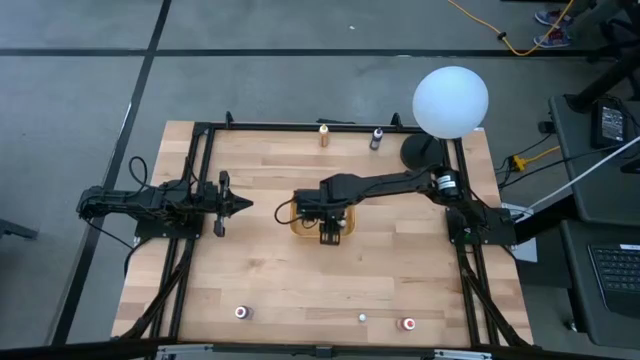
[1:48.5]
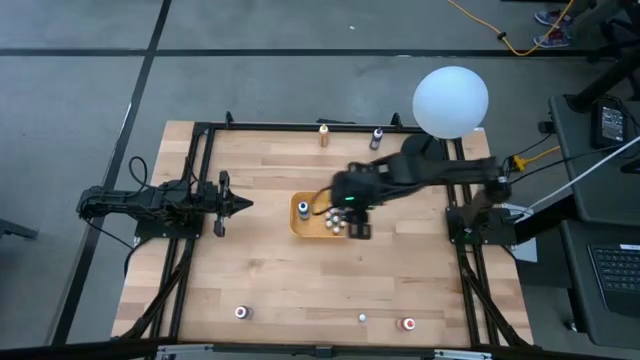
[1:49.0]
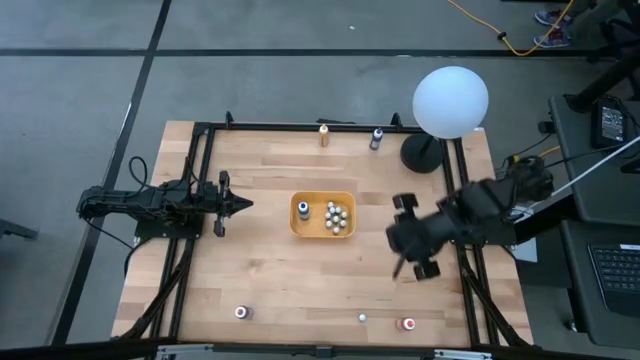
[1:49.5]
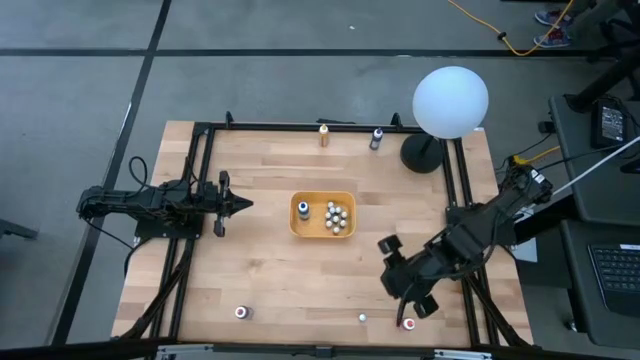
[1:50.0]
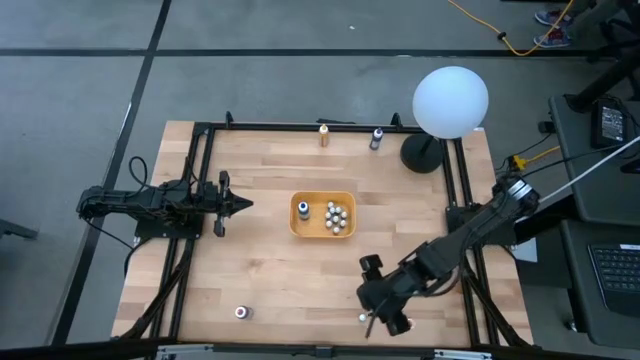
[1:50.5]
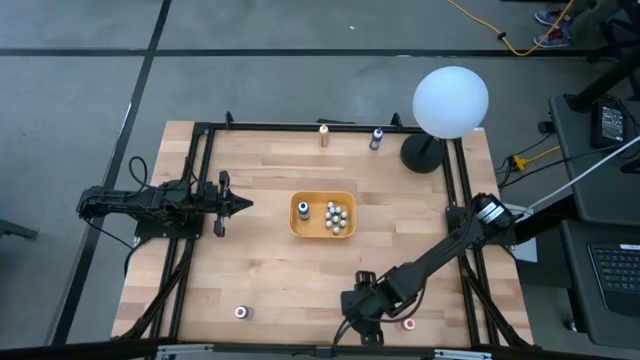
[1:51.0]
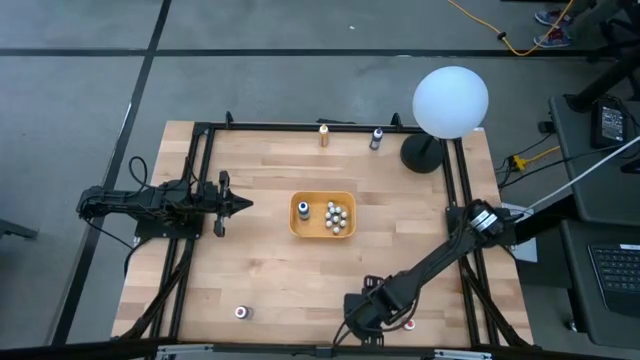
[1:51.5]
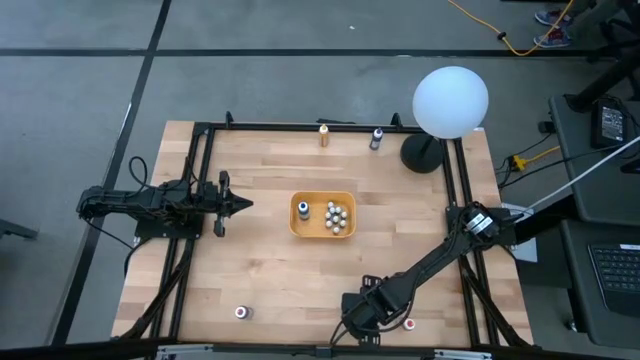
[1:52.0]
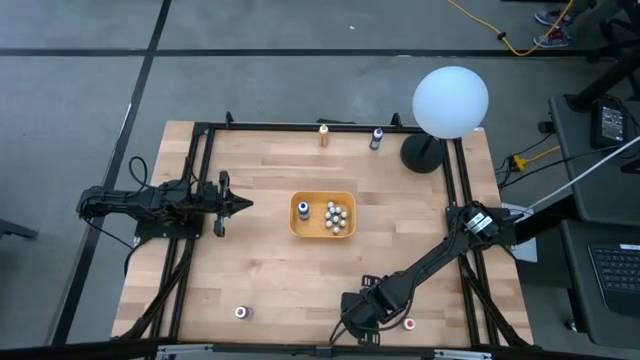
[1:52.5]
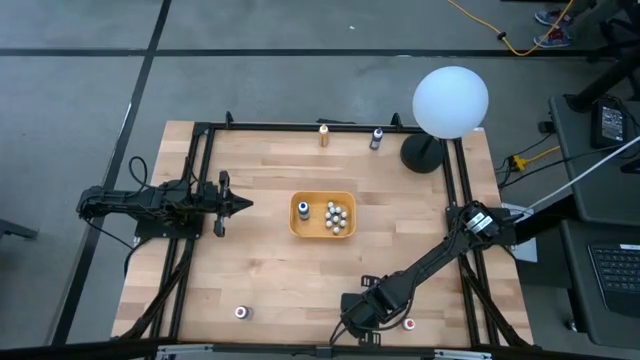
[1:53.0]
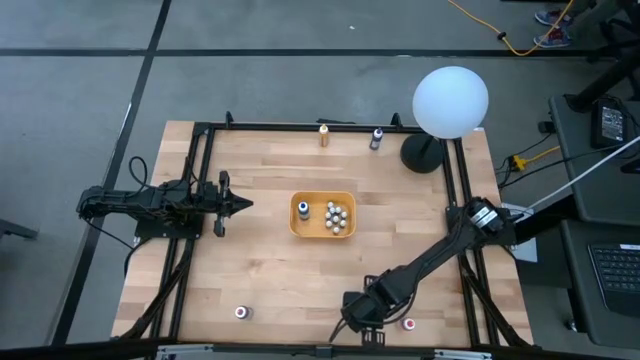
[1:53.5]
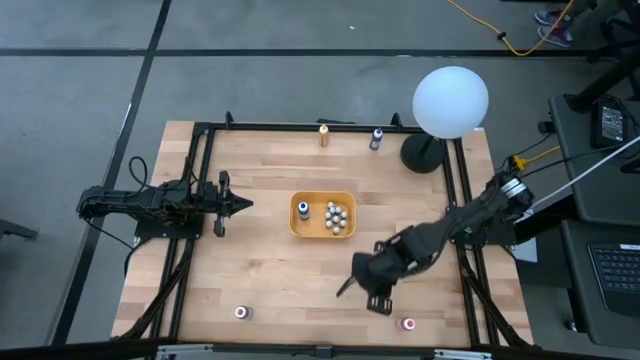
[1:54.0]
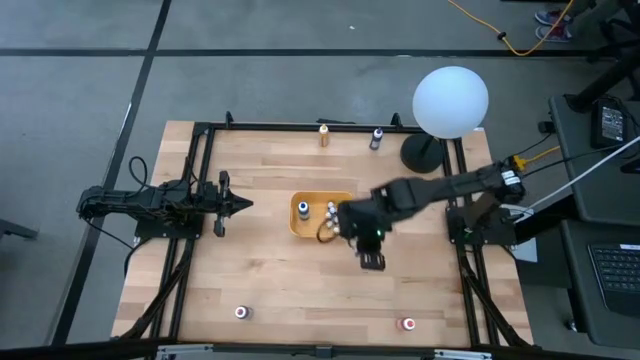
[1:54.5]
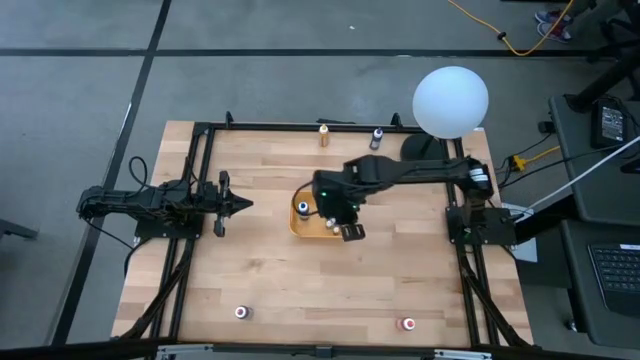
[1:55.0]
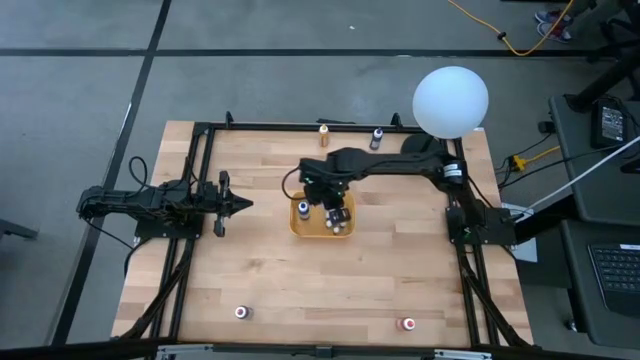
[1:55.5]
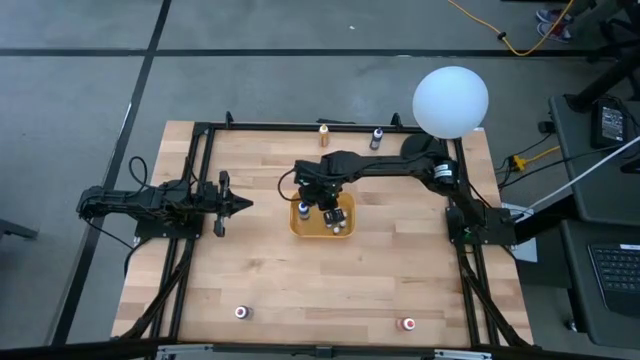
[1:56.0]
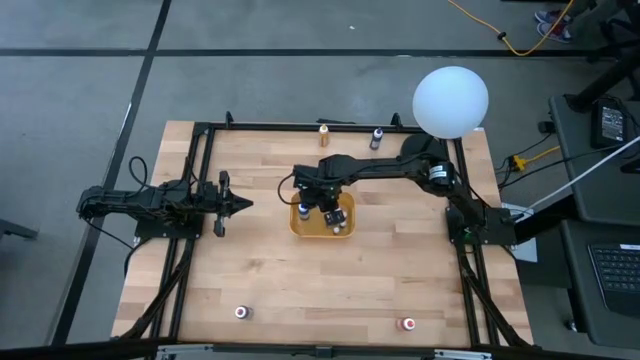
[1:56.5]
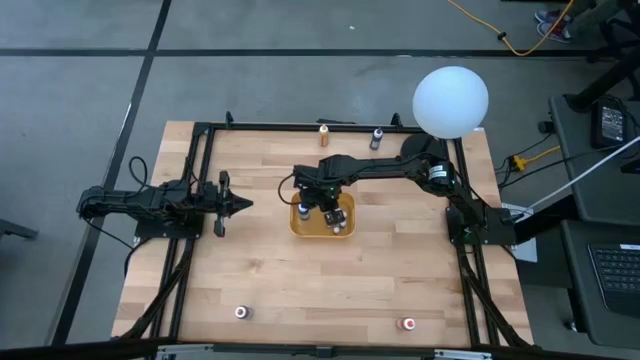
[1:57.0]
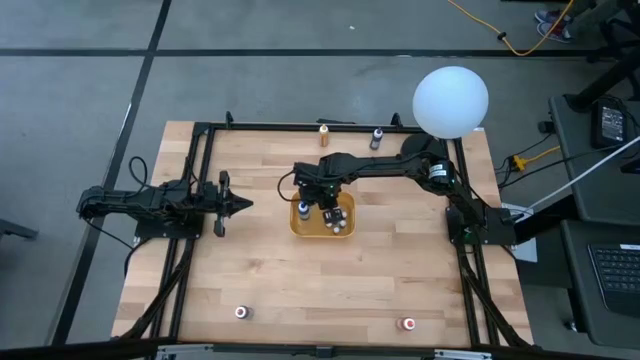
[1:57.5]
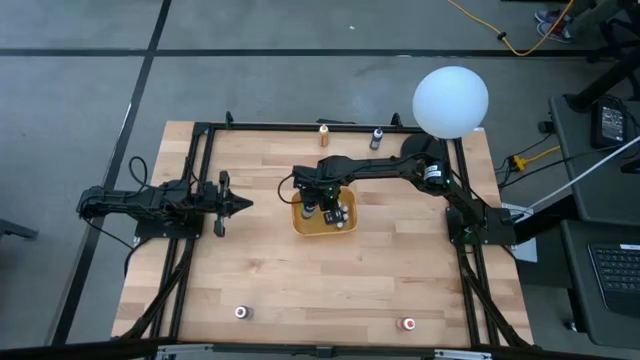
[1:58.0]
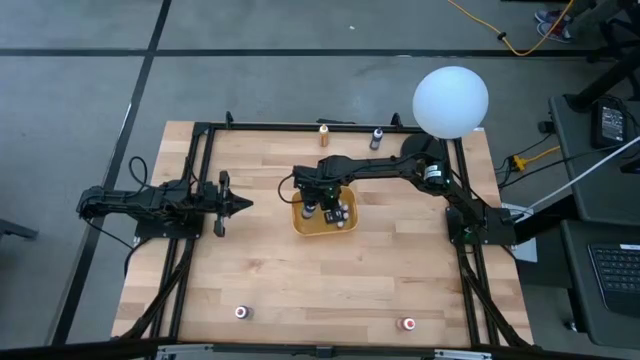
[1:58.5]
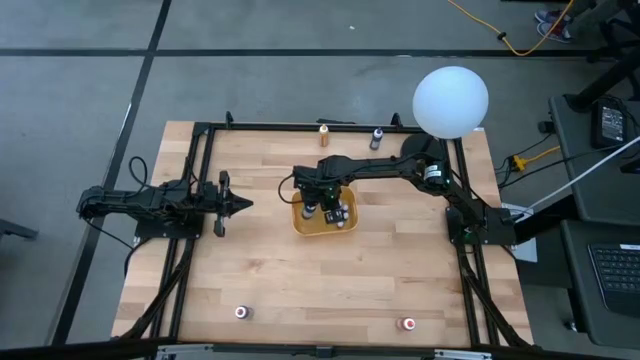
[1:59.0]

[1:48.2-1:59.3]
Task: Pick & Place food coloring
Put the green food coloring bottle into the yellow bin

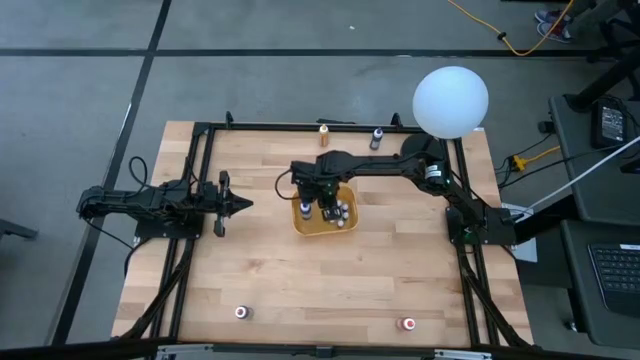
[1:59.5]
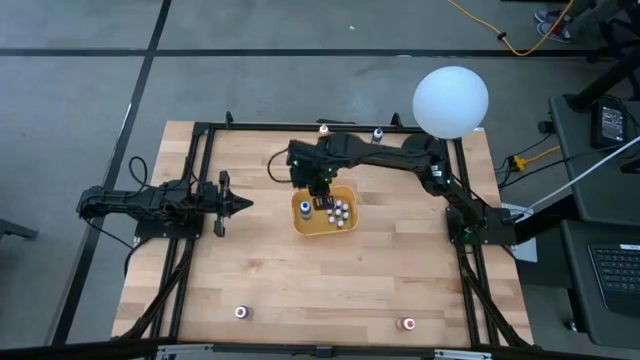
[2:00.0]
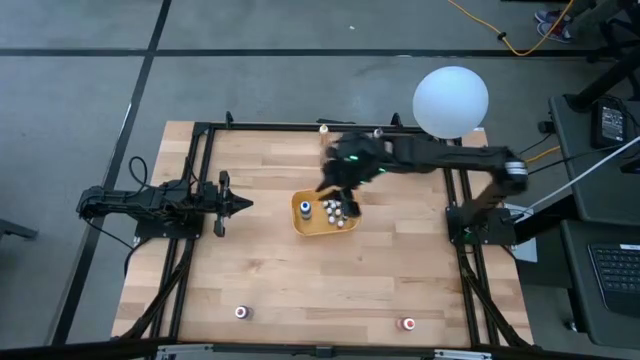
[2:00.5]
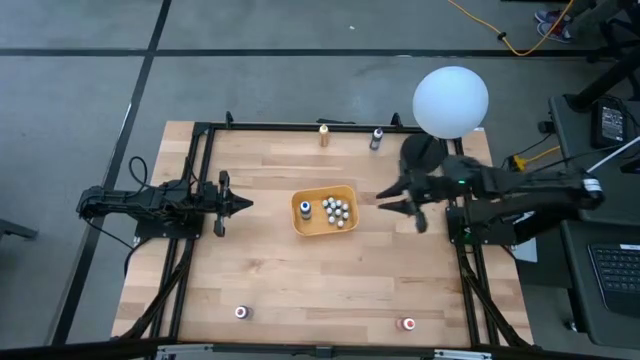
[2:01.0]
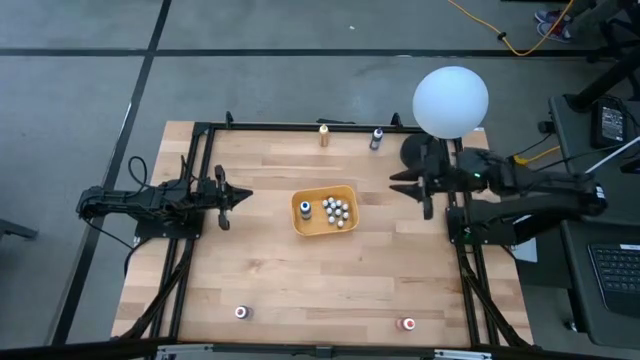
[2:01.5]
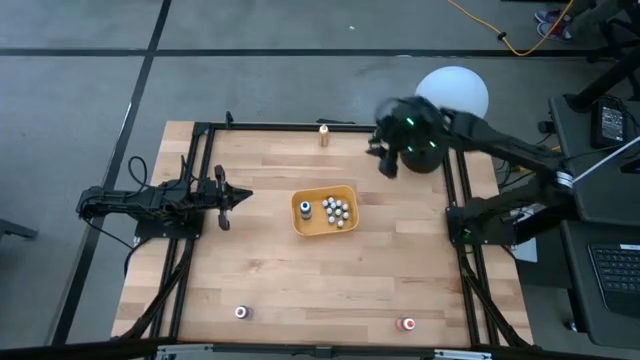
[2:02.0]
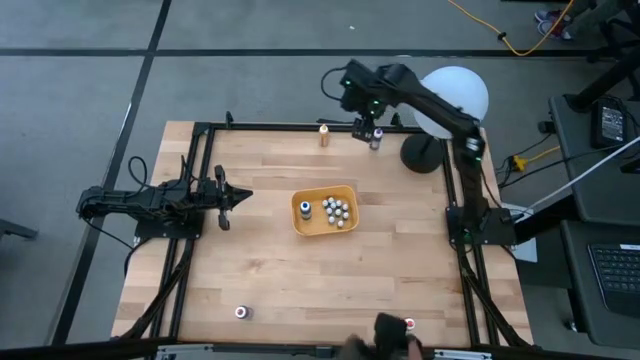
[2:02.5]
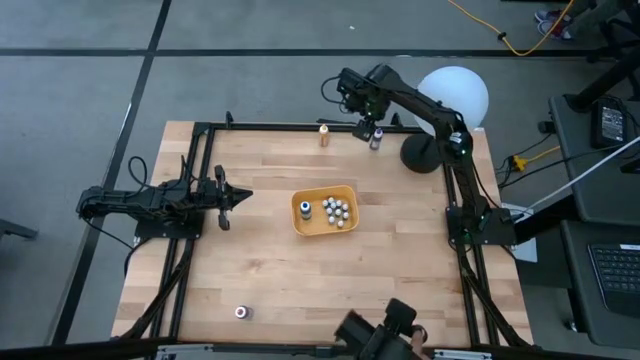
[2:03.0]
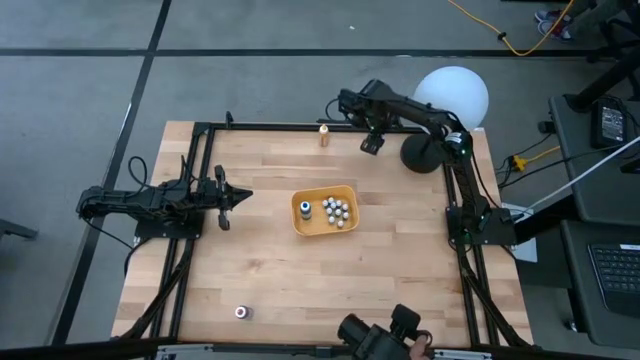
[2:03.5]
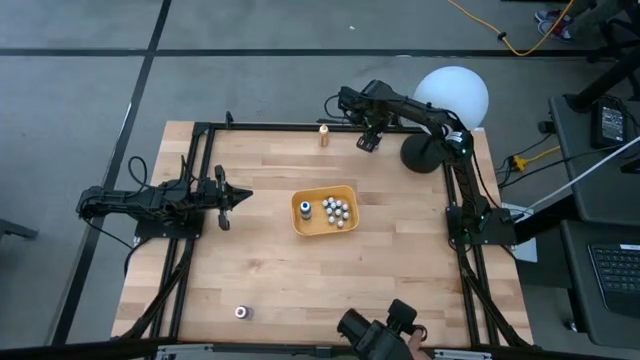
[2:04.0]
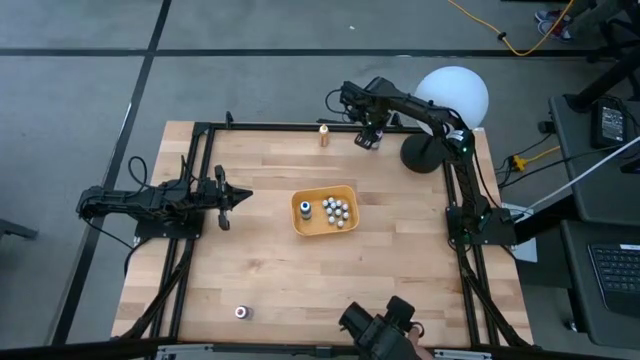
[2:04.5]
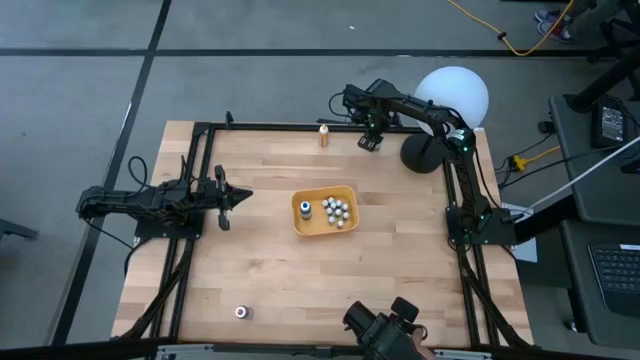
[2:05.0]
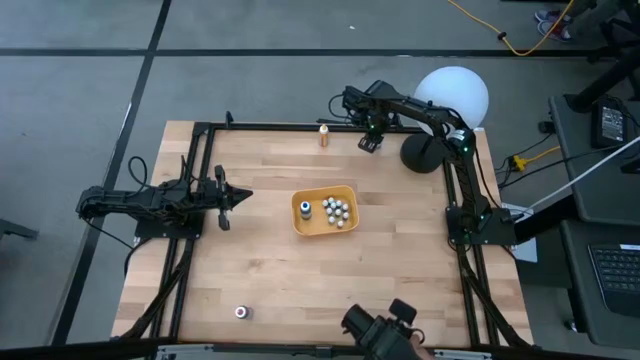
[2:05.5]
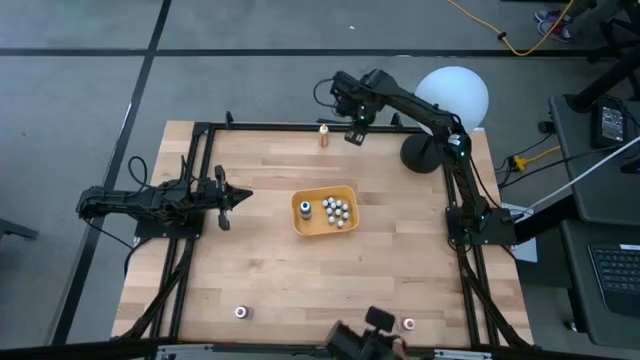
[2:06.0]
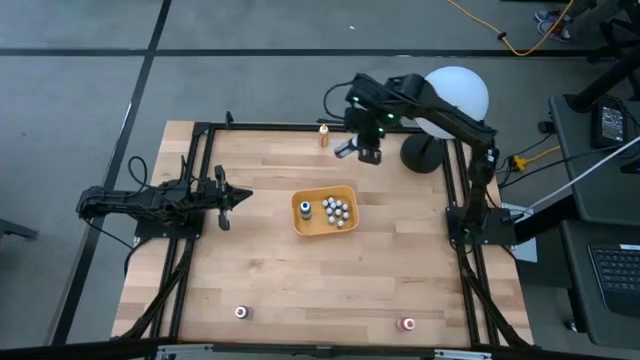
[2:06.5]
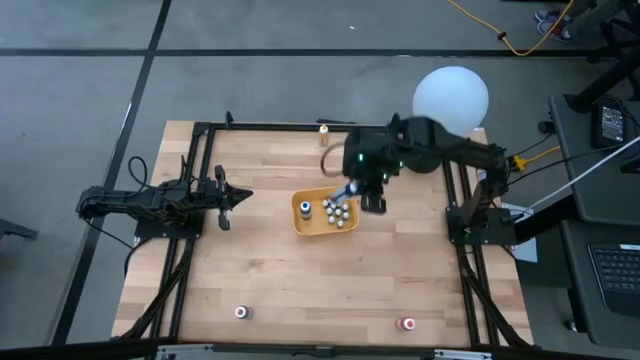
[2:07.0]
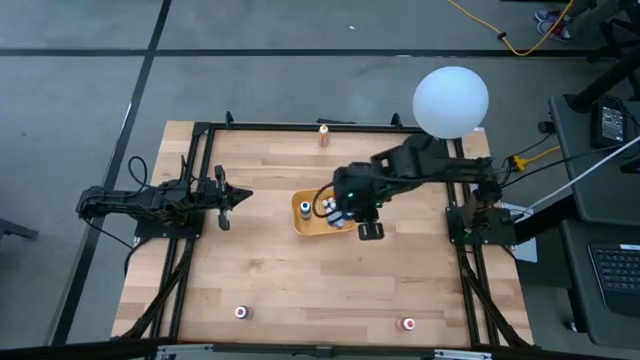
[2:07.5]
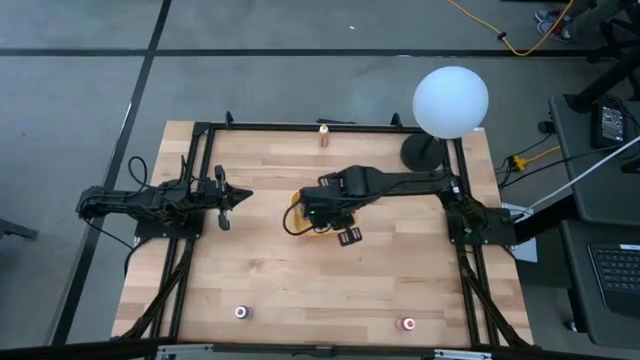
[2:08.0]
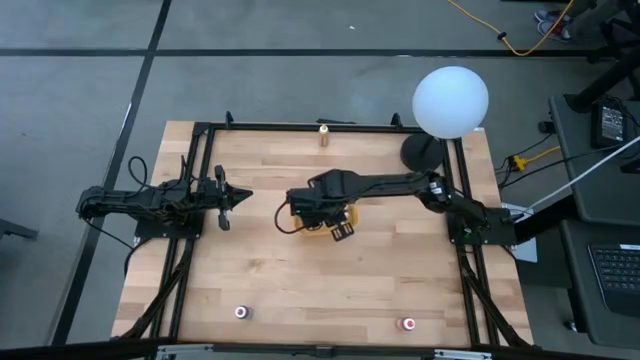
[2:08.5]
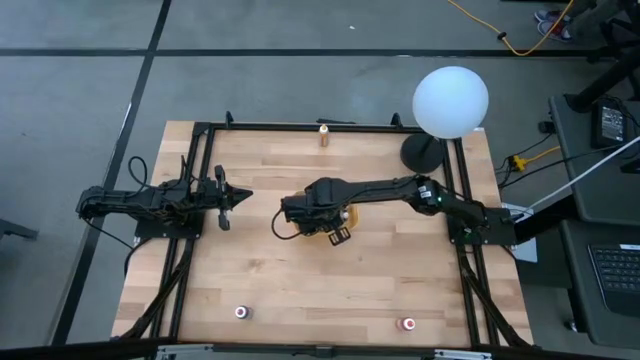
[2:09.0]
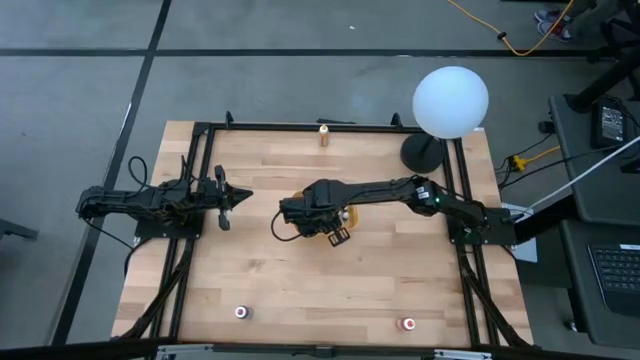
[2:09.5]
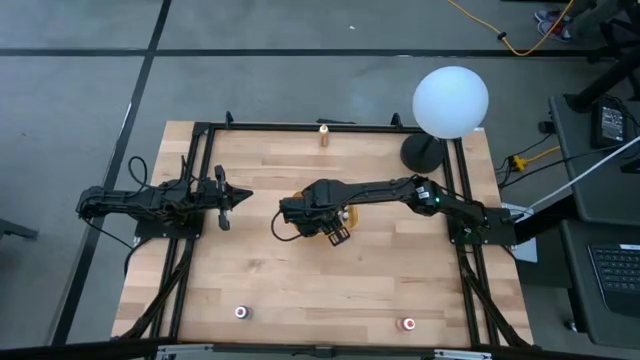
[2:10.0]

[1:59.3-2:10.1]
Put the purple food coloring bottle into the yellow bin

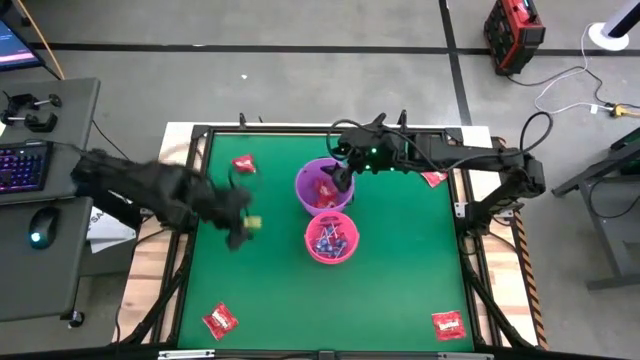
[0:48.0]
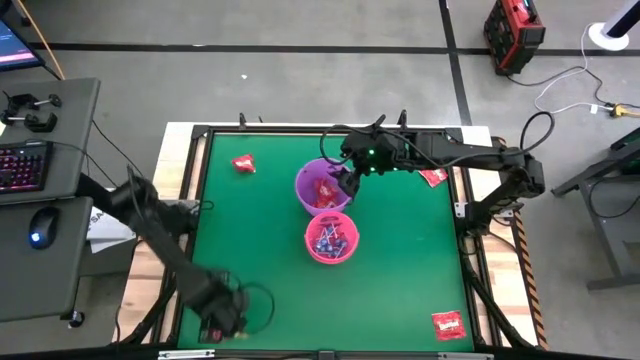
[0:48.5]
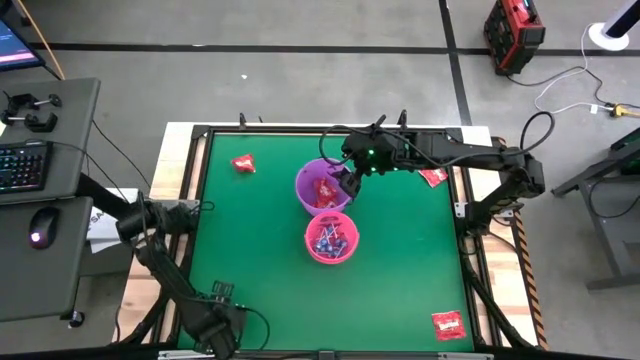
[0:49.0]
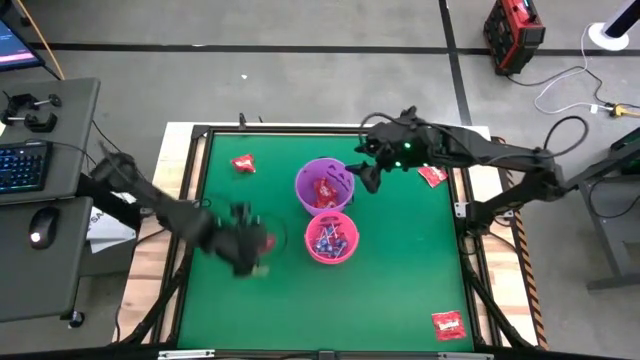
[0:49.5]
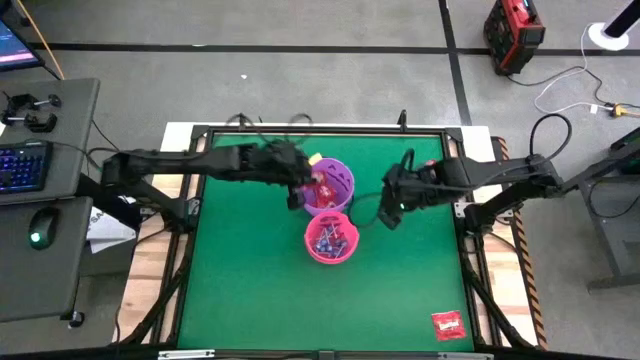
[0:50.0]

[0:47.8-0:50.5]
Task: Sort candy by brand, put in halloween buckets
Put the red candy into the purple bucket
